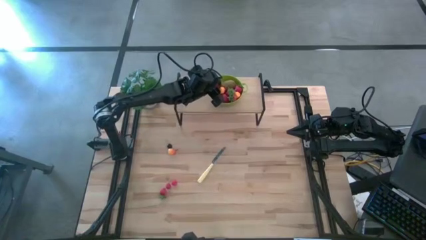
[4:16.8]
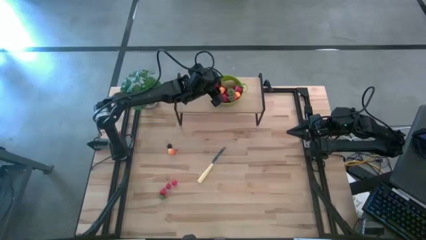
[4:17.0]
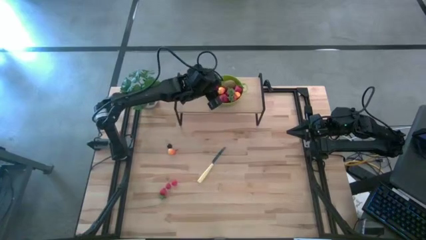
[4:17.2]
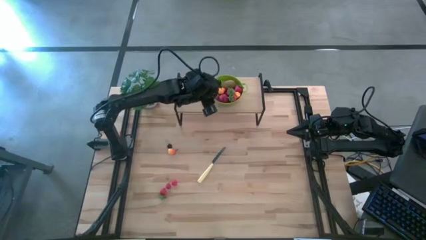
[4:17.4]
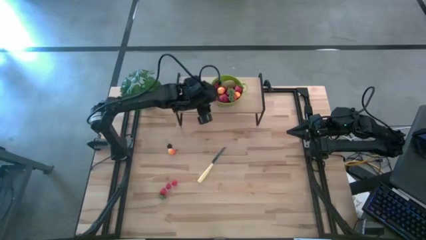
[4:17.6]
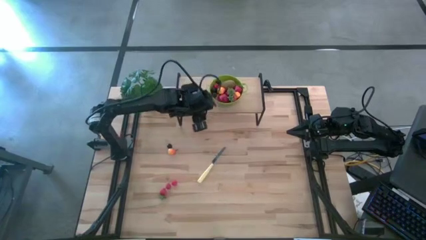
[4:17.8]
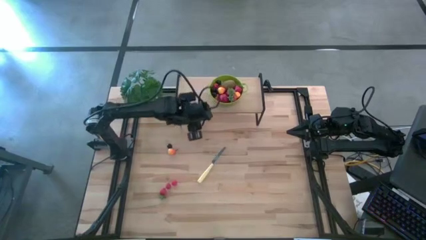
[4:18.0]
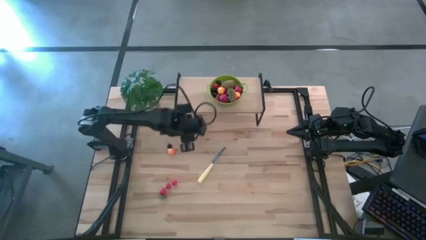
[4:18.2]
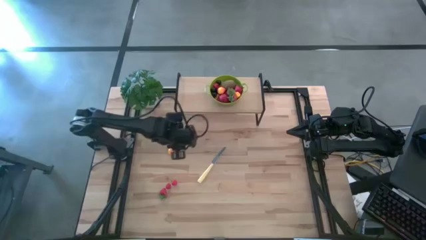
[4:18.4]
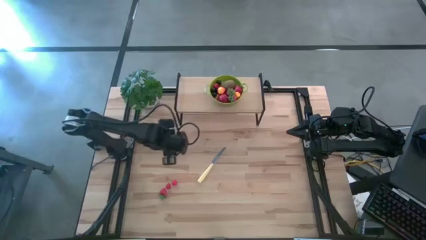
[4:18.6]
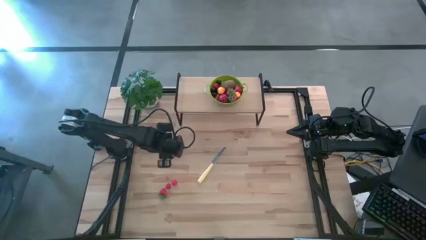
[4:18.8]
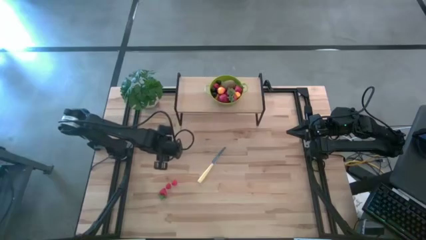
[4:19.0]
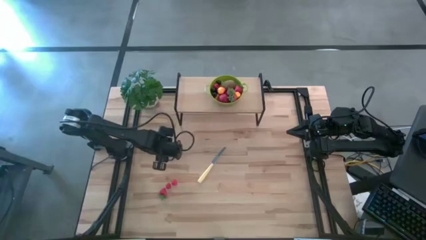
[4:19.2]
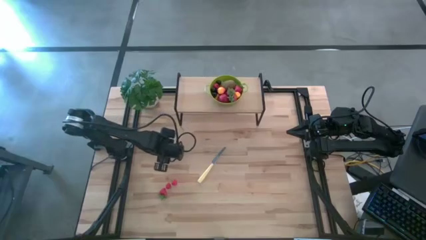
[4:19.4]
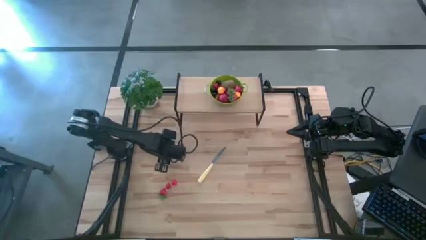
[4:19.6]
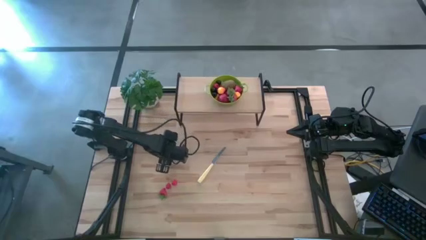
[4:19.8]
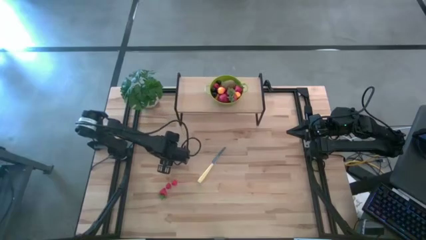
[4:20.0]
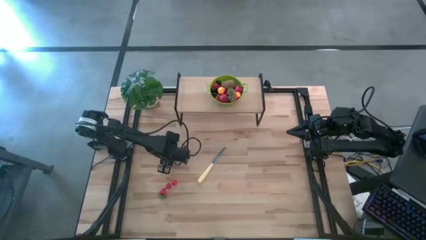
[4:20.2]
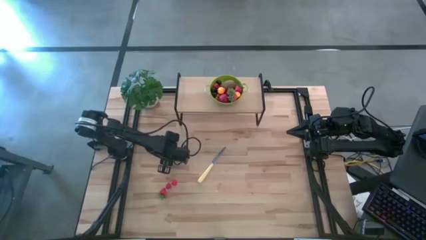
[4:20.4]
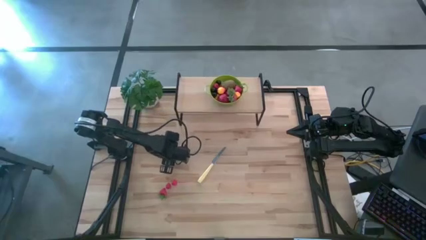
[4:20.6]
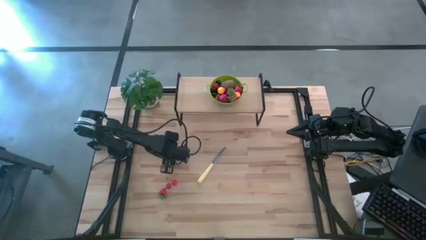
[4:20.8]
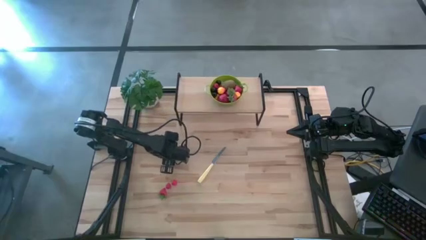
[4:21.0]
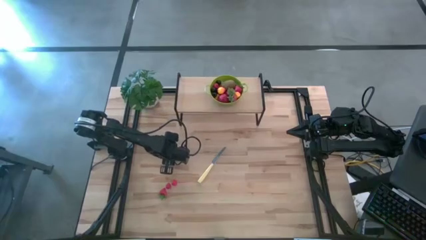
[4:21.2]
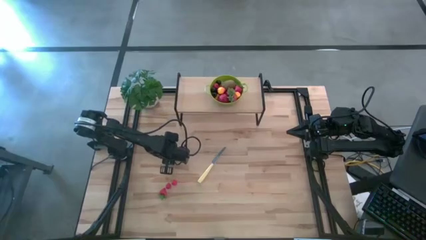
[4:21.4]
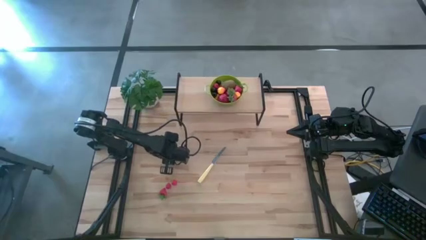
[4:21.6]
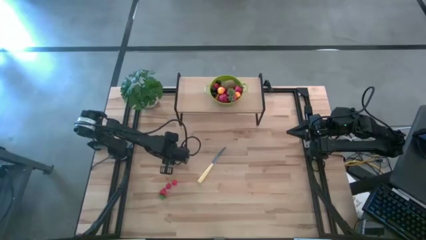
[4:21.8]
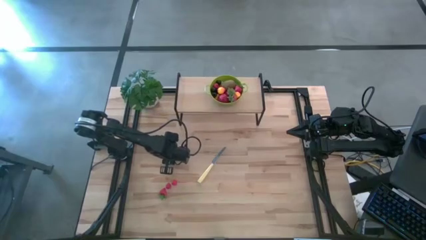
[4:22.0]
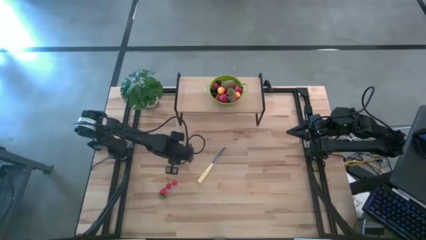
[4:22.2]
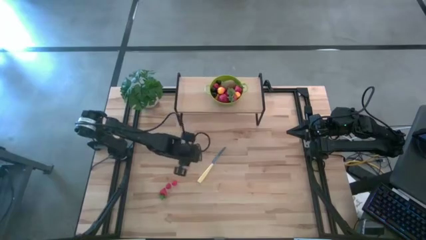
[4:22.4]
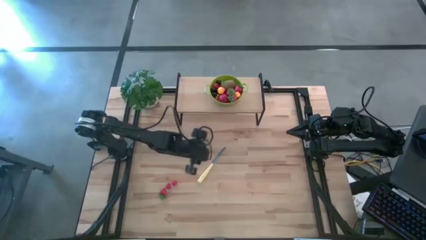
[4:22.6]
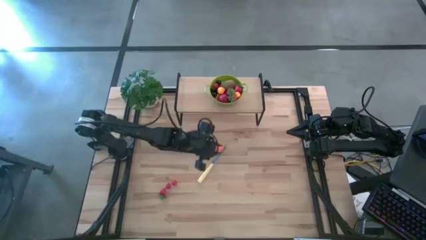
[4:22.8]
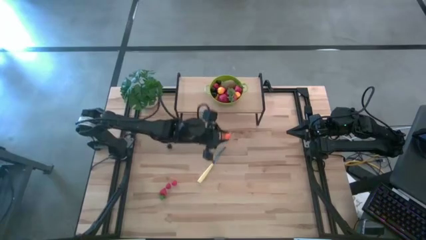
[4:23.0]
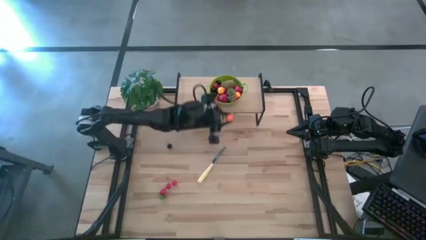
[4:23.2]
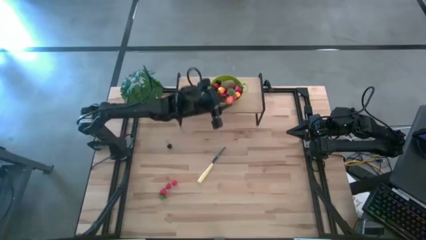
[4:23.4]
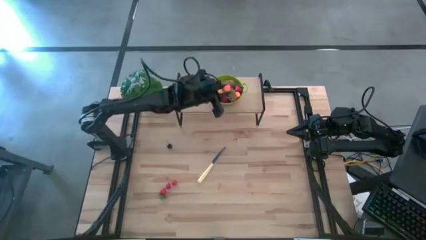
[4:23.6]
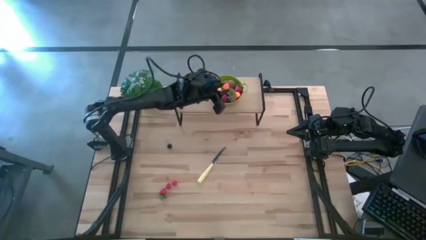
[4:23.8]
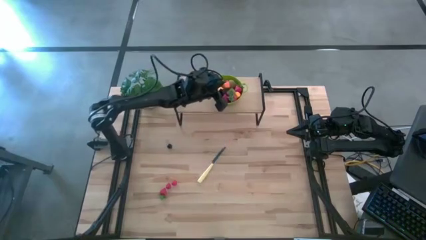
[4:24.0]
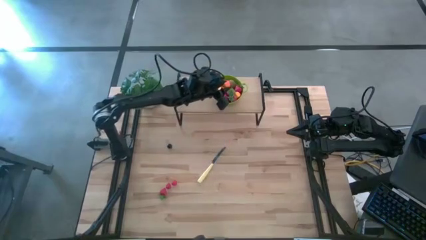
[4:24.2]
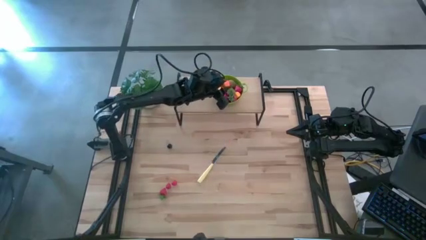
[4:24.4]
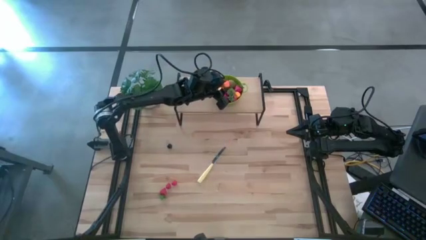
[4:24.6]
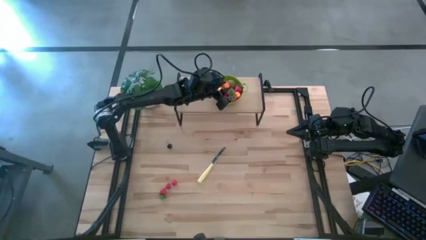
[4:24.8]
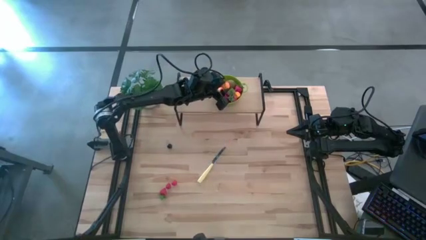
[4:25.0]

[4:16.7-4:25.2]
Task: Pick & Place Fruit
Put the pear into the strainer bowl

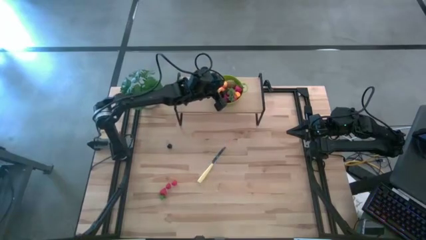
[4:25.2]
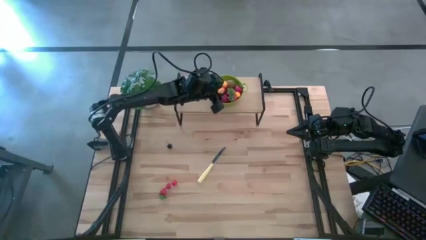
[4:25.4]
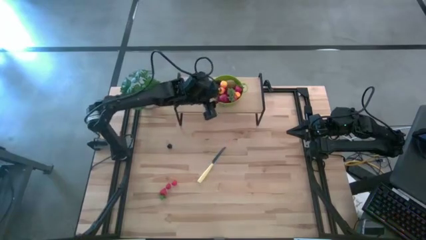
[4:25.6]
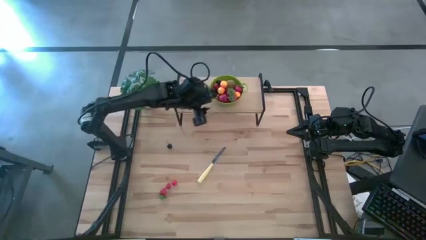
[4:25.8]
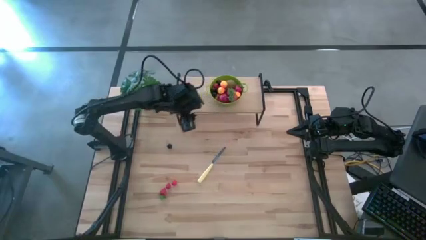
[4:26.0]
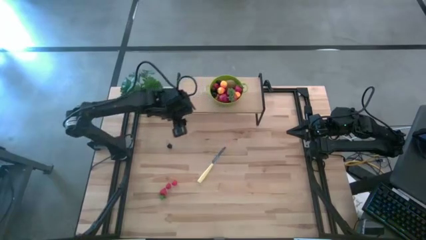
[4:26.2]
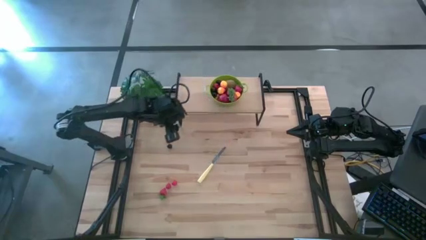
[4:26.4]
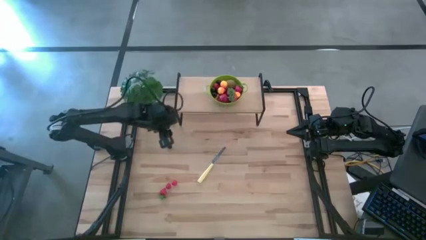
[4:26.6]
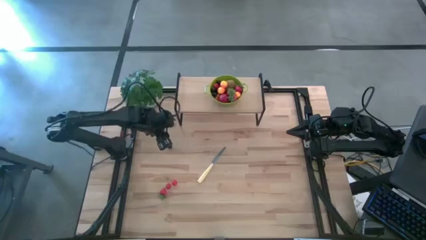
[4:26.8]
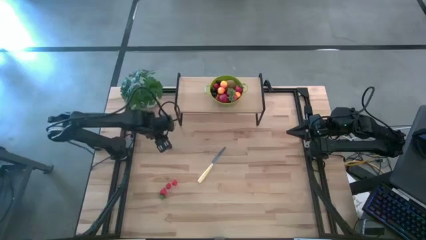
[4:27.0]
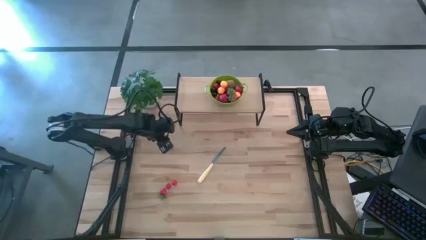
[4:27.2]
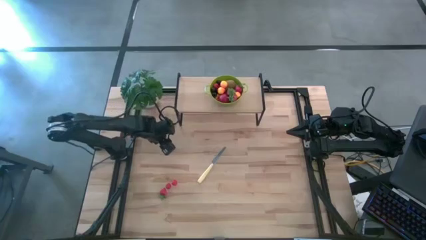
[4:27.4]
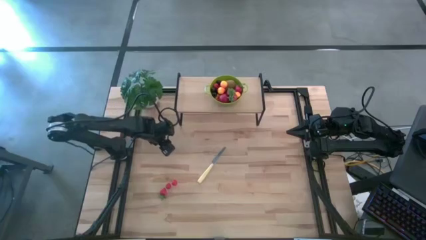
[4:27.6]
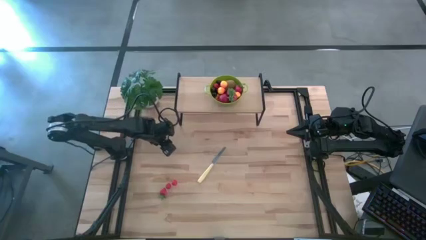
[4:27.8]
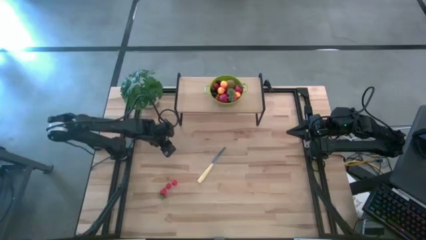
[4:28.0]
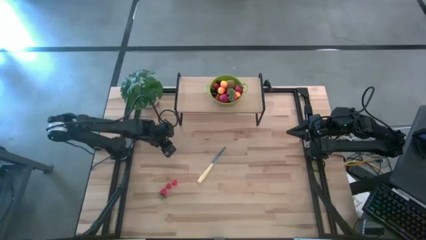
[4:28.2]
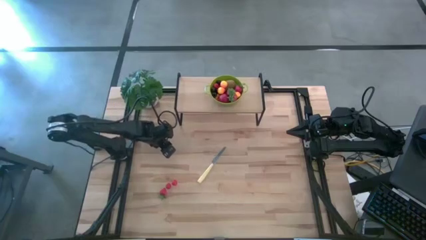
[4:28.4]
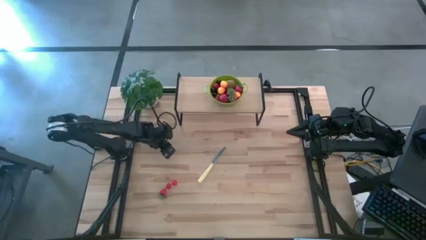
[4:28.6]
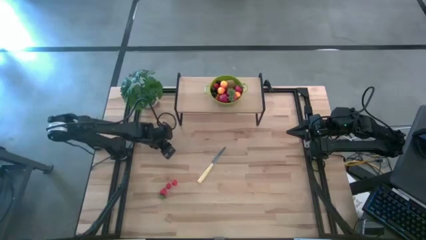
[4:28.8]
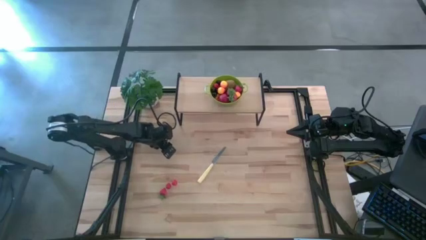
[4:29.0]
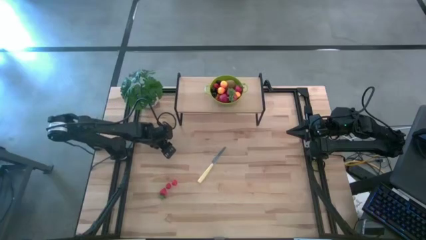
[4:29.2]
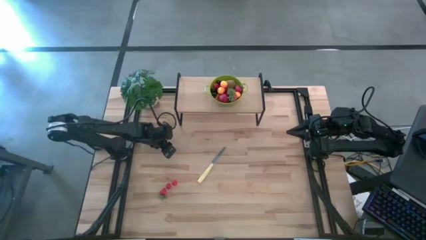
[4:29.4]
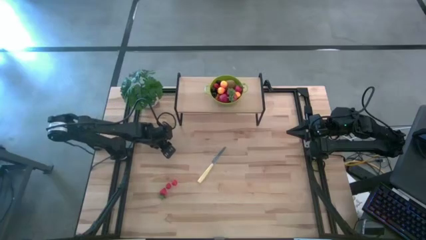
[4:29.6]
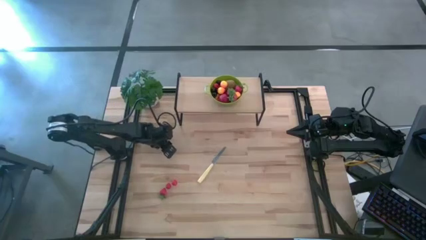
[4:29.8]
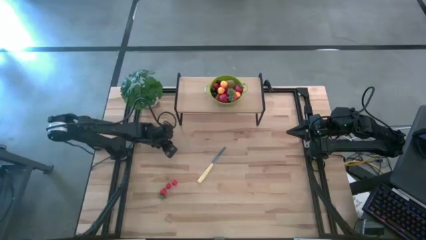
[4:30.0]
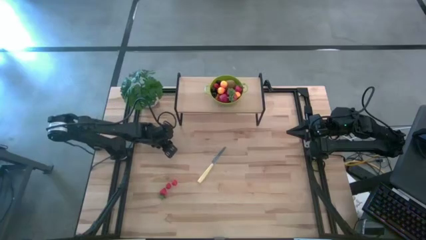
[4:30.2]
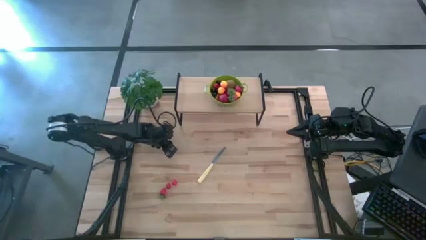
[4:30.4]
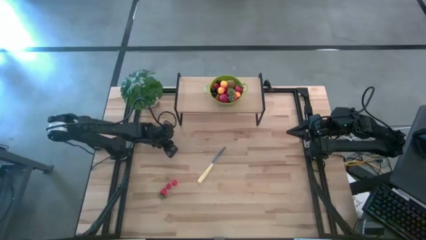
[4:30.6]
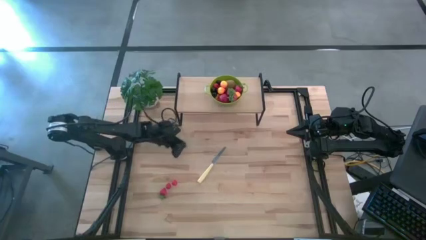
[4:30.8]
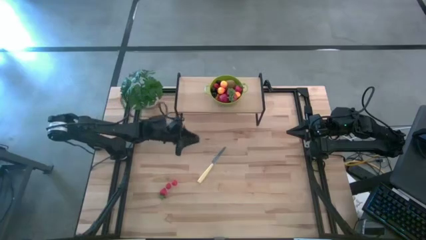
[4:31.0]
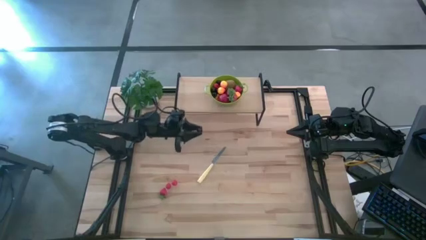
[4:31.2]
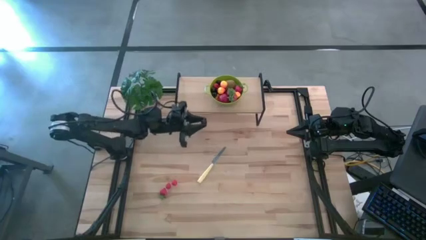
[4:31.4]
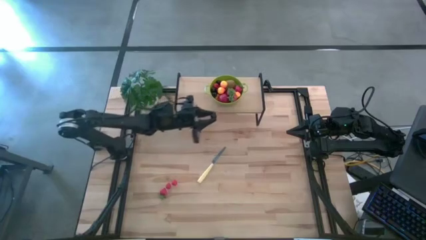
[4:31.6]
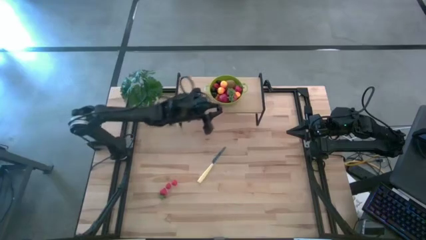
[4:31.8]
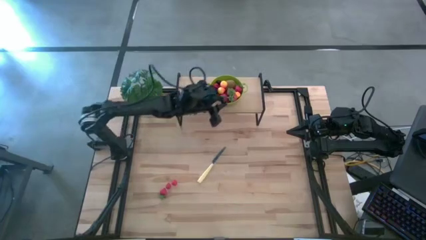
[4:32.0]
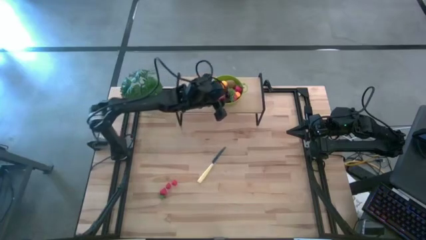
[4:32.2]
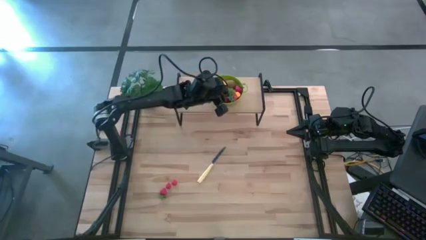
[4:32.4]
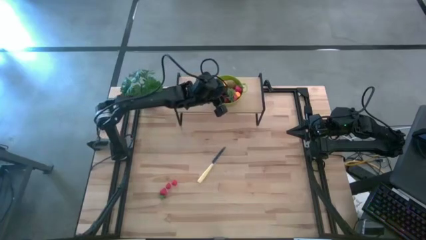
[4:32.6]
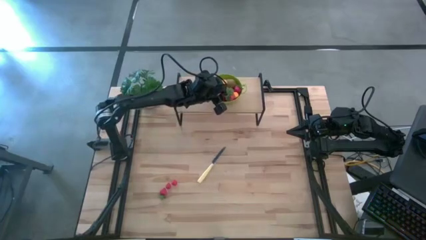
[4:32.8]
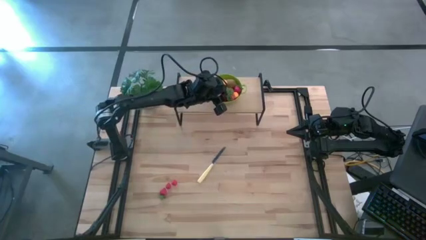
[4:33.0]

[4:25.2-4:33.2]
Put the black cherry into the strainer bowl
